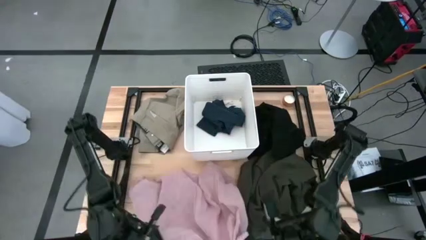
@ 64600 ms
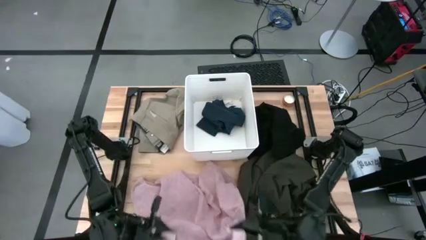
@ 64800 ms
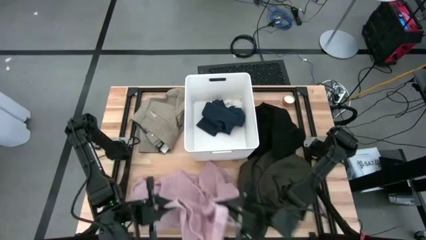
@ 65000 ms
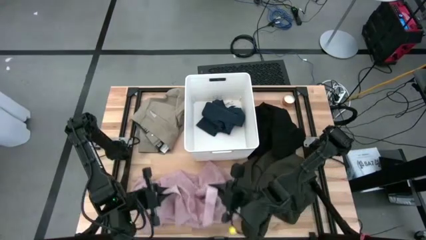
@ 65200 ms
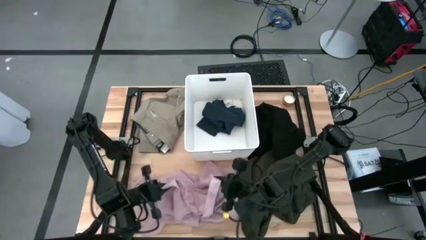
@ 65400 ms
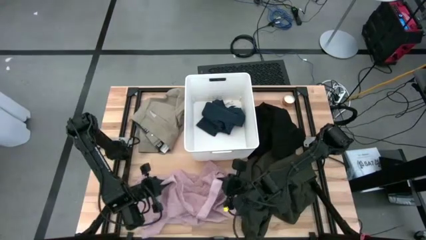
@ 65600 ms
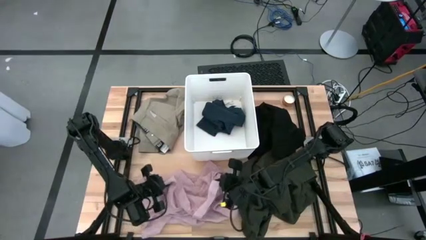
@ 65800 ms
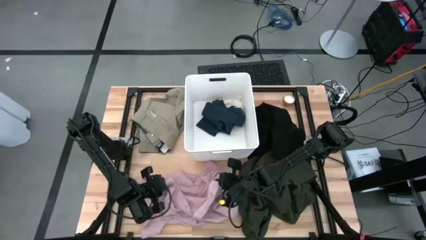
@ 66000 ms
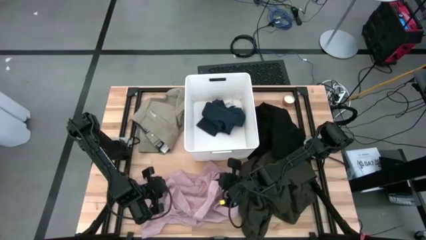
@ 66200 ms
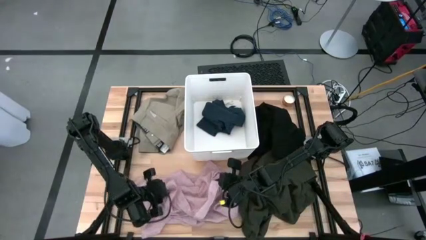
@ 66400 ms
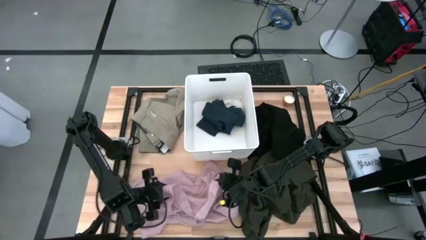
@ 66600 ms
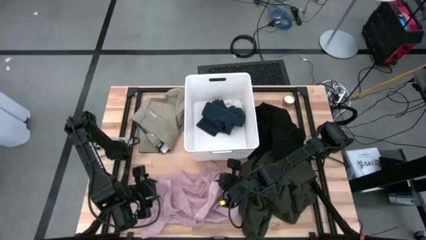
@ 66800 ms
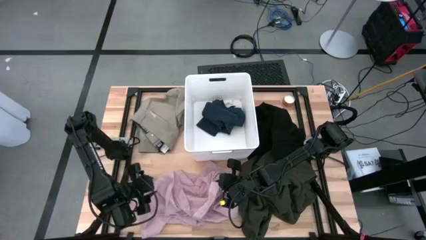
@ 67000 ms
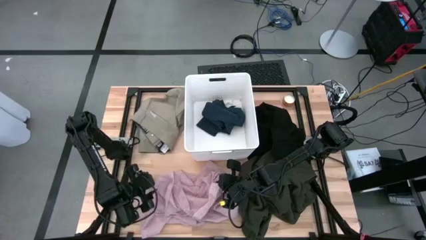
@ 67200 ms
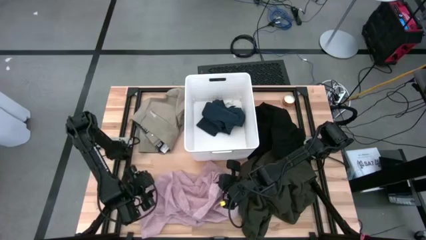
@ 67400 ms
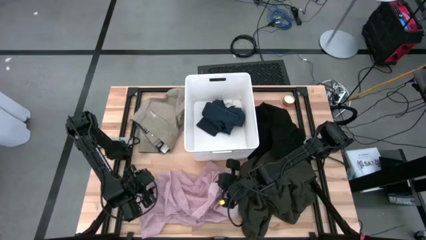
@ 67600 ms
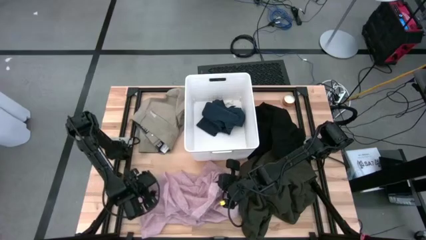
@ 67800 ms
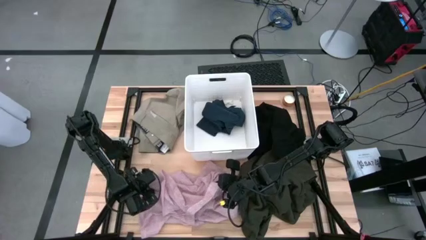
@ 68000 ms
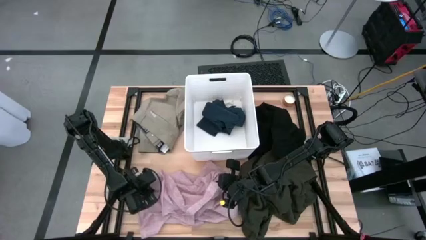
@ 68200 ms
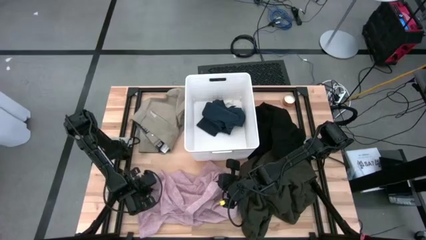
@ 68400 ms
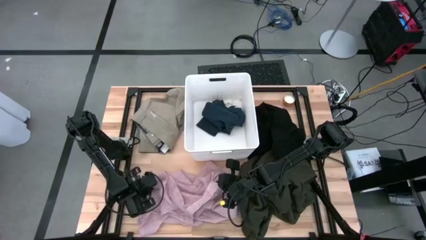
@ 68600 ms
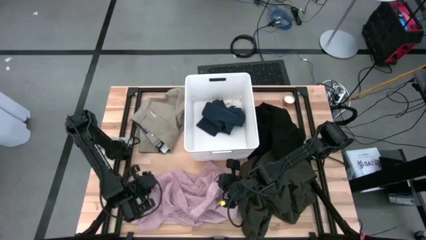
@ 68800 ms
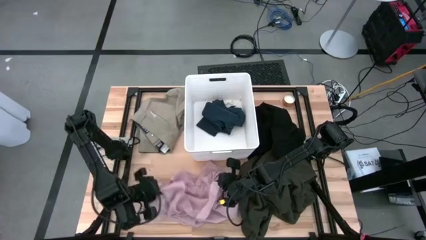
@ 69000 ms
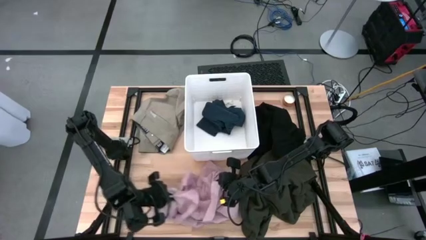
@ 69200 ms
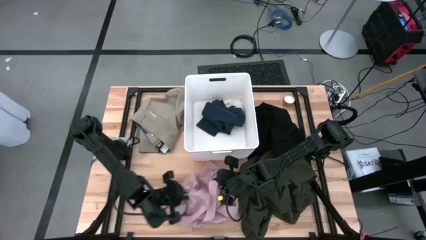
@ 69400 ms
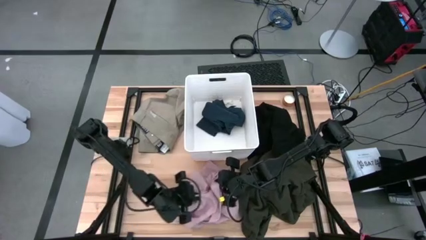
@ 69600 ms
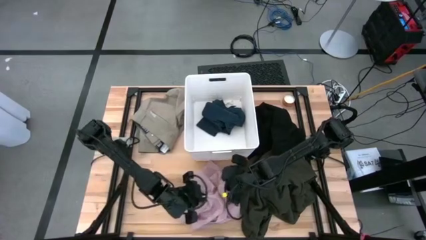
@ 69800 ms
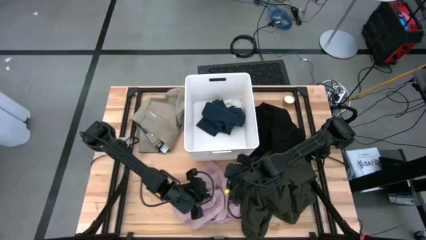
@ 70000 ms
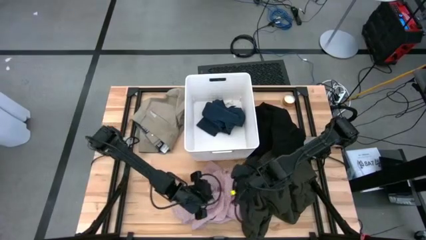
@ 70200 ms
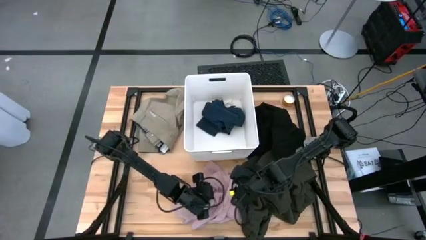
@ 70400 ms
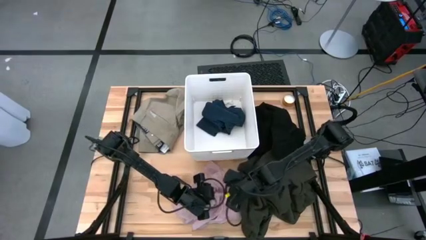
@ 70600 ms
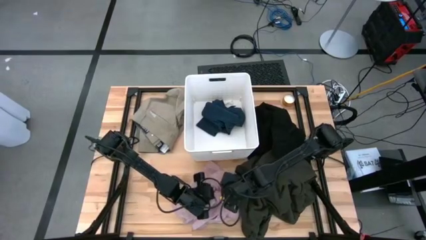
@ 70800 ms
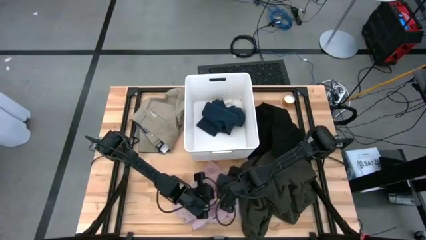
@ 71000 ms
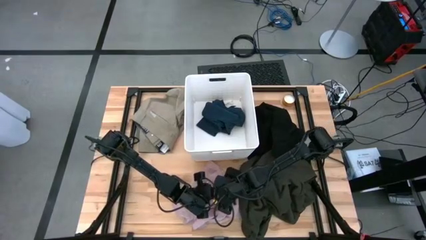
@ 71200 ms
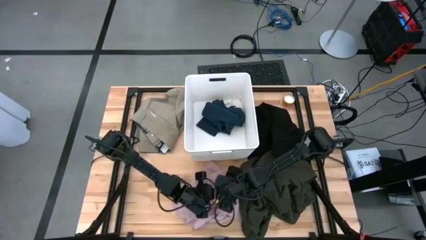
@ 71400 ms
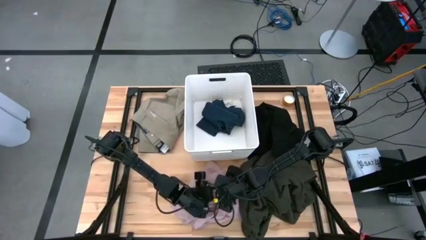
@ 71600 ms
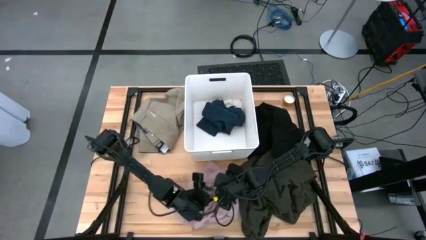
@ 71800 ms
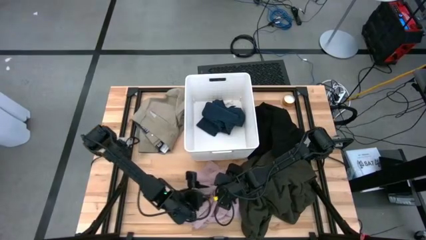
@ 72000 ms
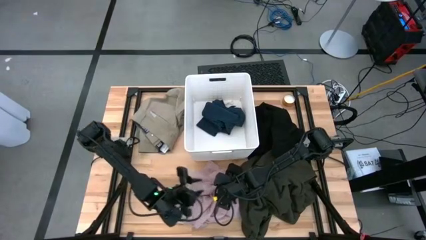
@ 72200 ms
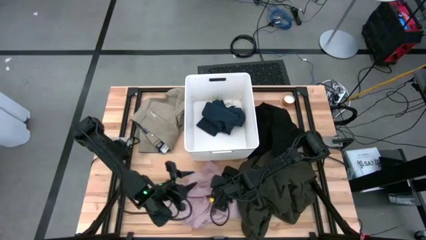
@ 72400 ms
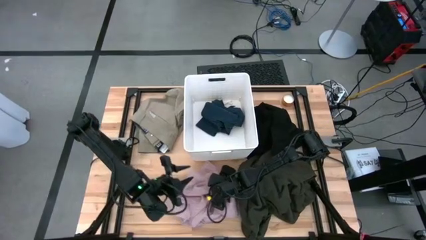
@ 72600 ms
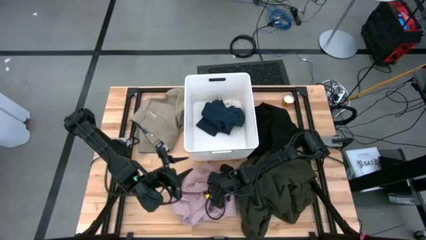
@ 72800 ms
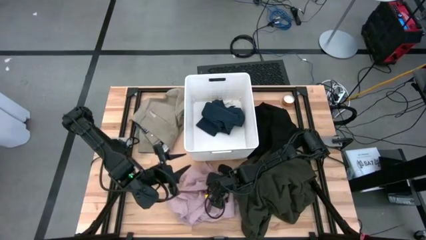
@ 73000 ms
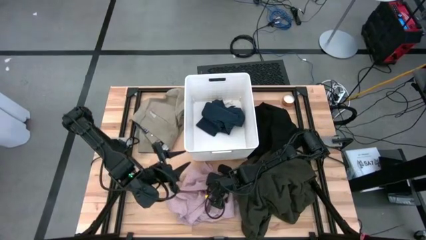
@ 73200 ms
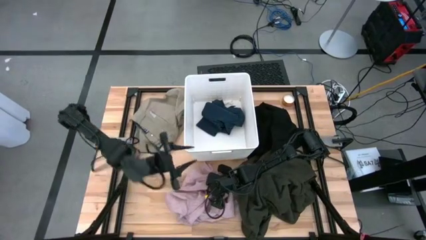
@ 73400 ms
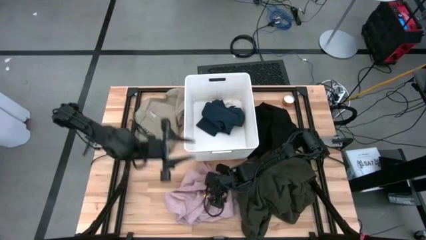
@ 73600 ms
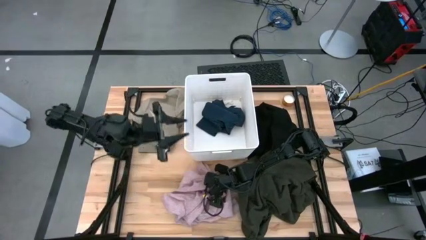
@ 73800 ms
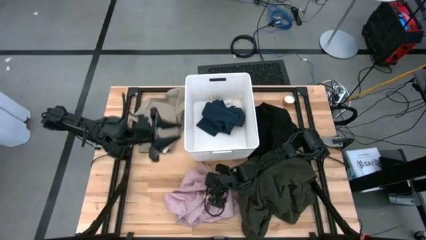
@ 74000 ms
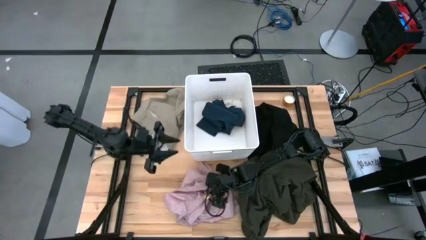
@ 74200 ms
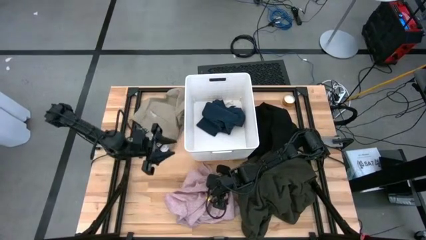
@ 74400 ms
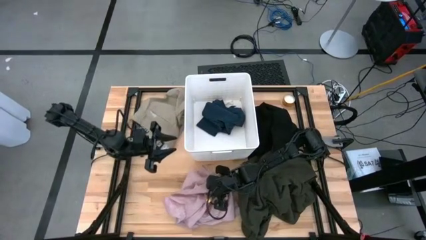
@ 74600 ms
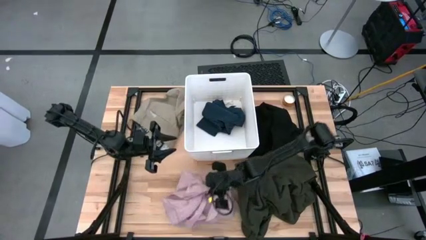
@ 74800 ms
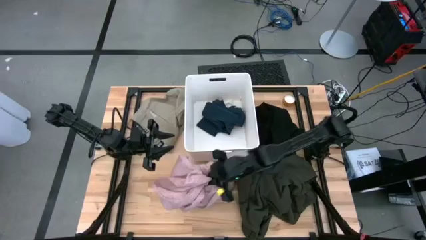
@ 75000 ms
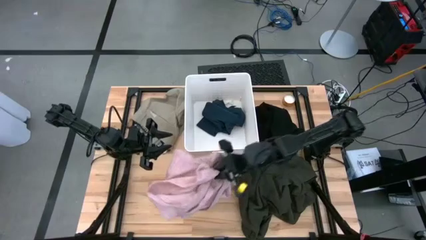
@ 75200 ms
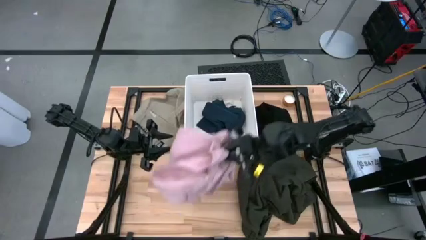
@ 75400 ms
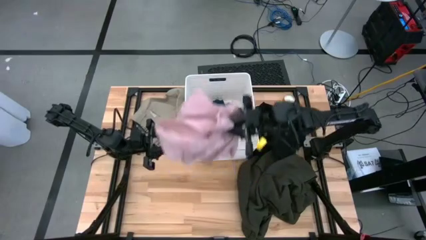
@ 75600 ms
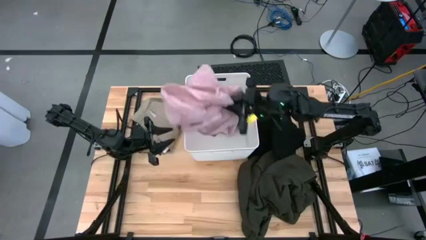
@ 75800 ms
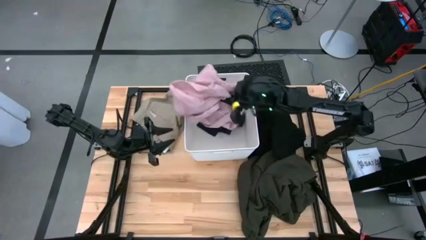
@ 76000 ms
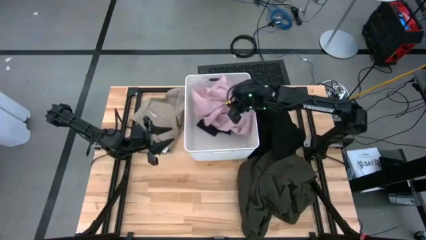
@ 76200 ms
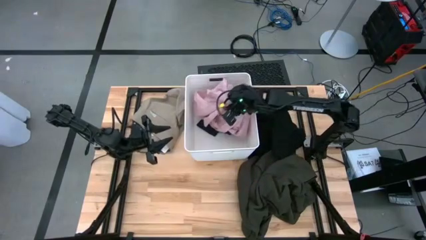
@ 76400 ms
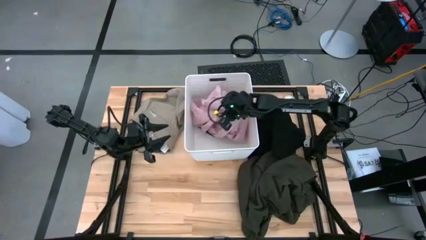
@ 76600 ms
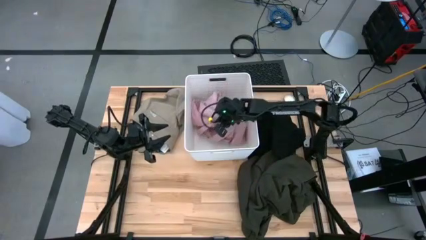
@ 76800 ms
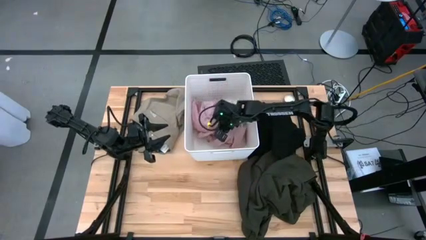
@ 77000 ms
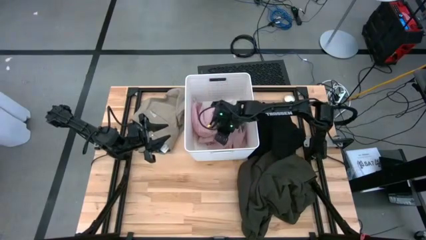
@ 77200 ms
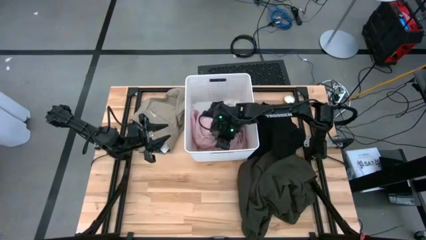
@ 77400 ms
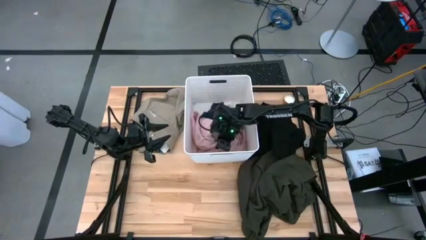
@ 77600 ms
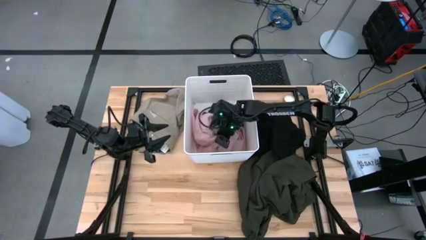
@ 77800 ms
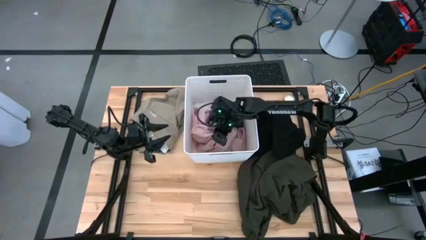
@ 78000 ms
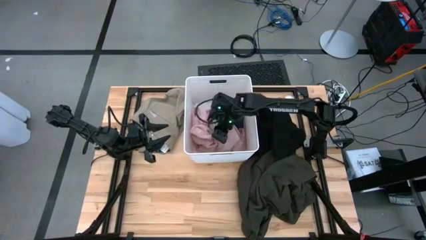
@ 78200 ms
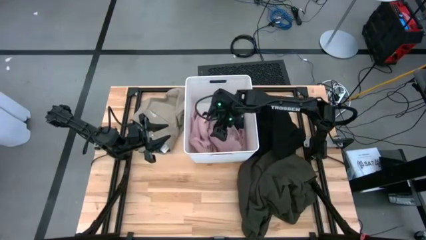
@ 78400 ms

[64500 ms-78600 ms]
Task: Sort clothes
Put the pink shirt into the white laundry bin

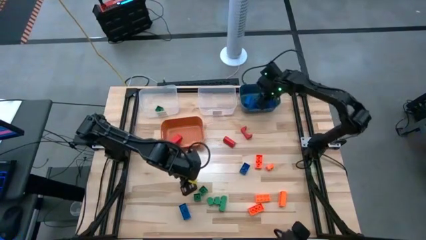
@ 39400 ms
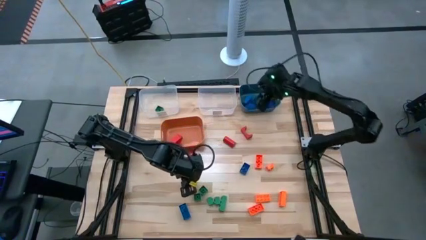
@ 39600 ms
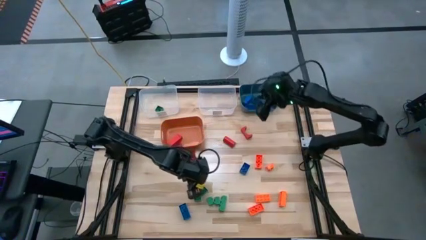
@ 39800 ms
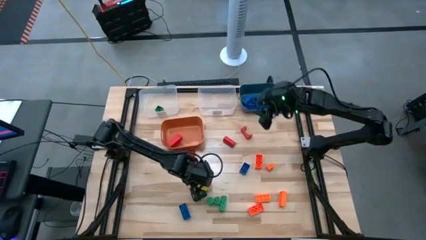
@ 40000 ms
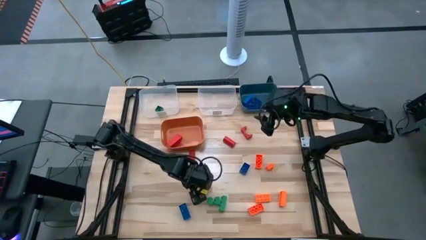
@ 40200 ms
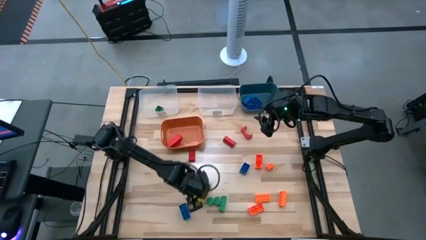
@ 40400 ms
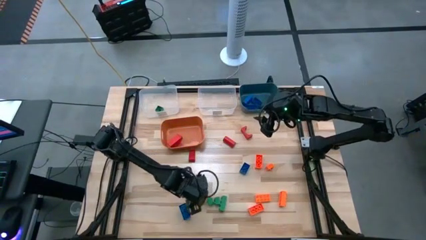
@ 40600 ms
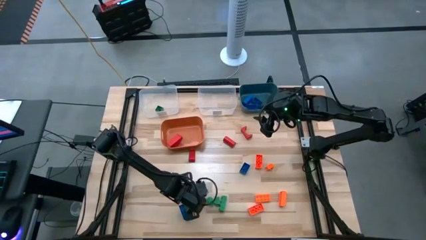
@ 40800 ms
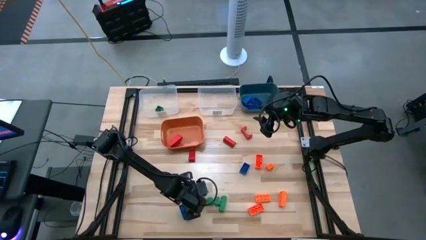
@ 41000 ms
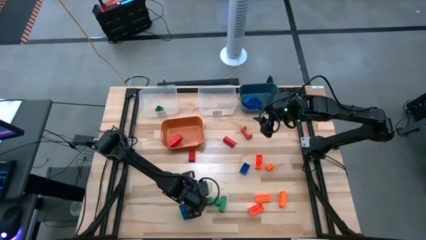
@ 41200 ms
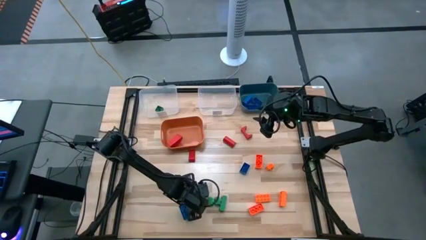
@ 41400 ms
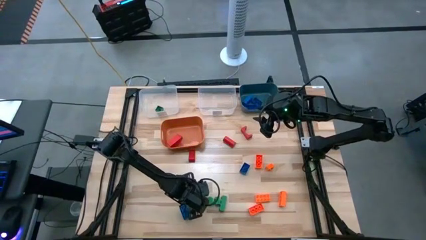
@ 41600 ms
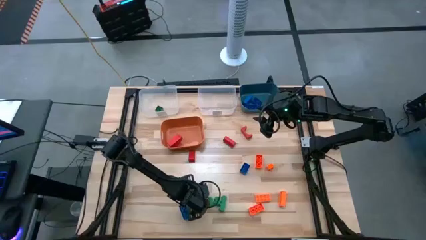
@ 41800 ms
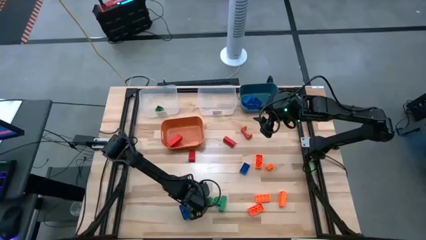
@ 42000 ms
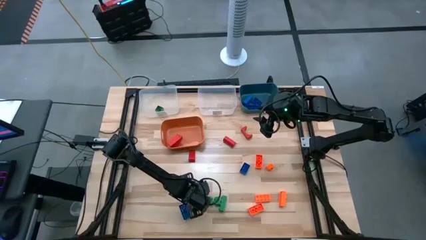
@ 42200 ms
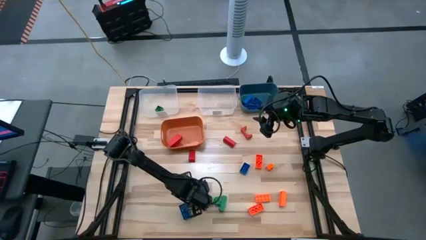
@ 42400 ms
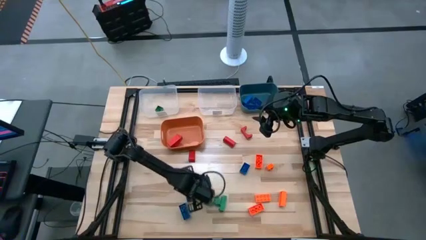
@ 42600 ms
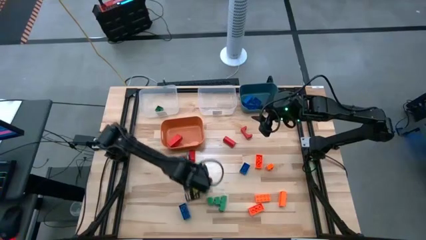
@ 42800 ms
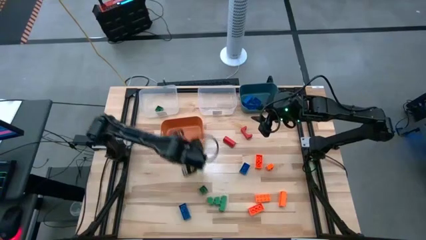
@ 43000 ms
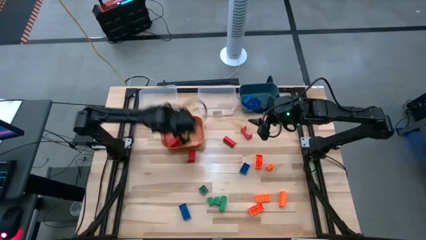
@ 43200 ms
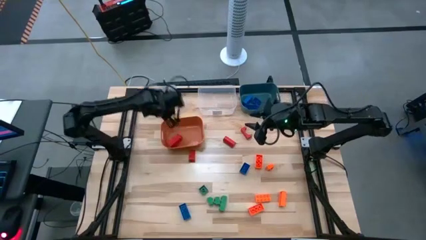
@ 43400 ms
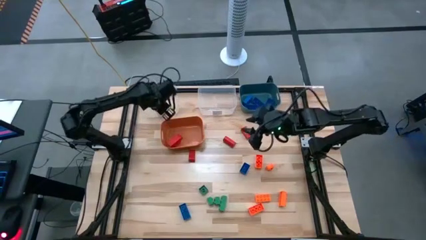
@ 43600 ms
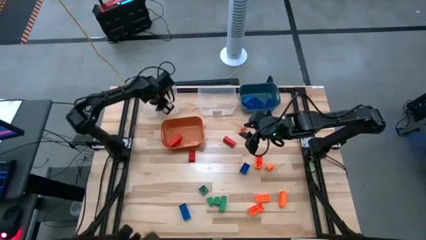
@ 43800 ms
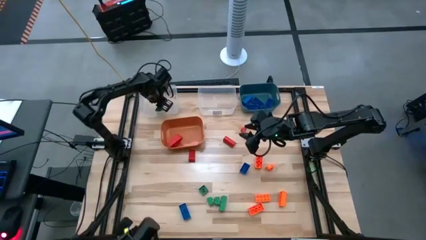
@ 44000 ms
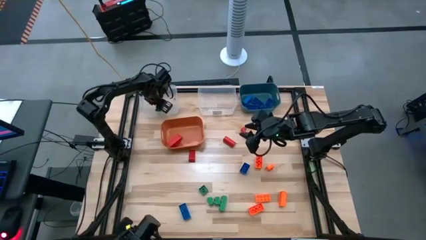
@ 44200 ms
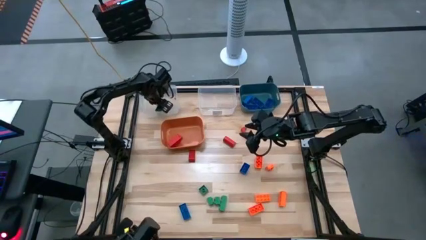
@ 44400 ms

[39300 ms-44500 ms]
Task: Sort blocks
Put the green game piece into the left transparent bin
